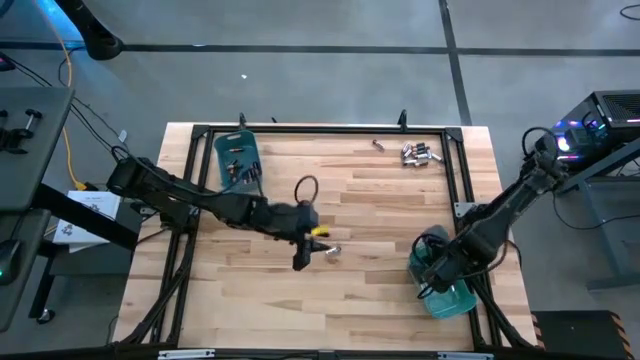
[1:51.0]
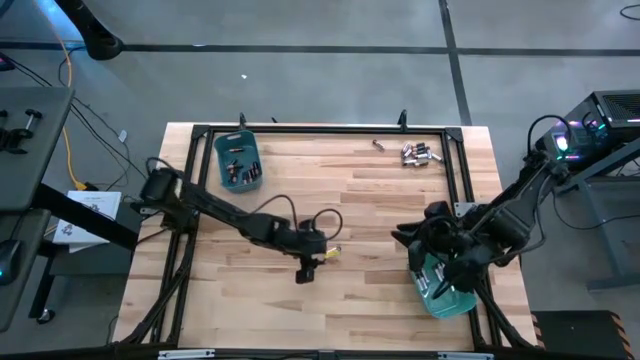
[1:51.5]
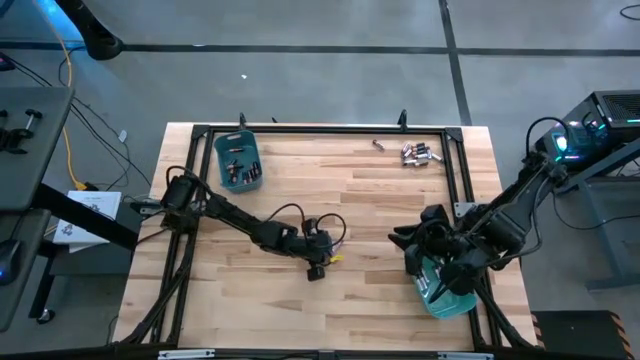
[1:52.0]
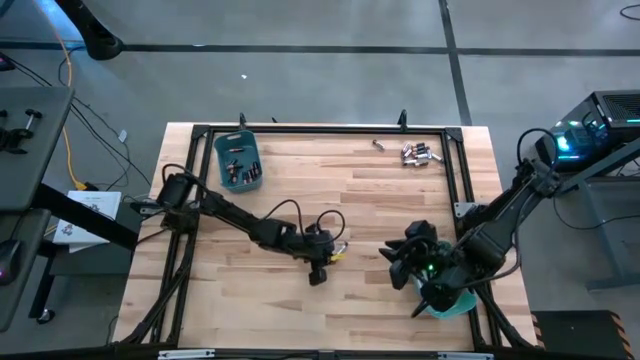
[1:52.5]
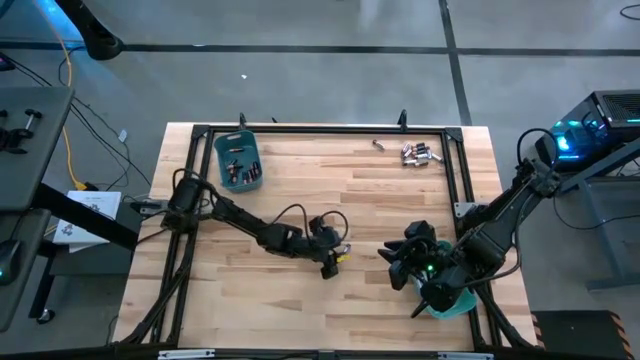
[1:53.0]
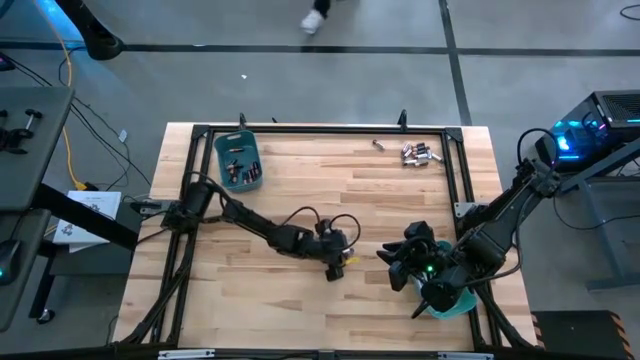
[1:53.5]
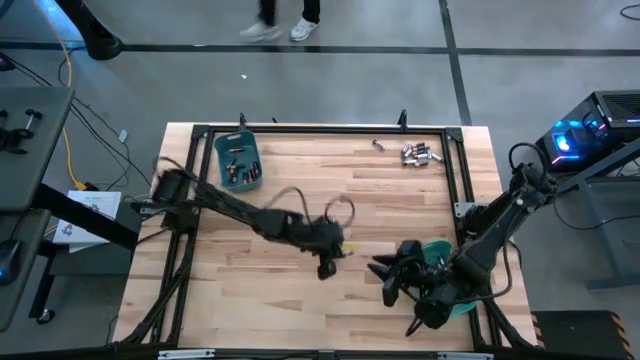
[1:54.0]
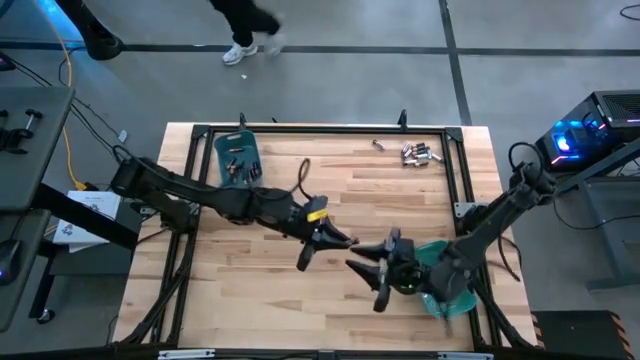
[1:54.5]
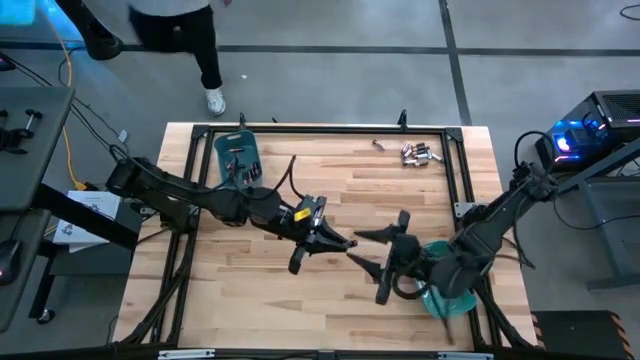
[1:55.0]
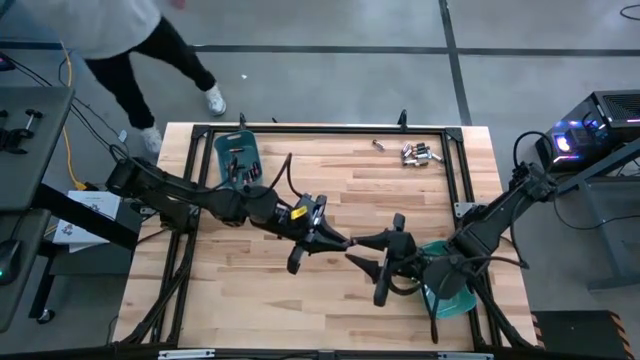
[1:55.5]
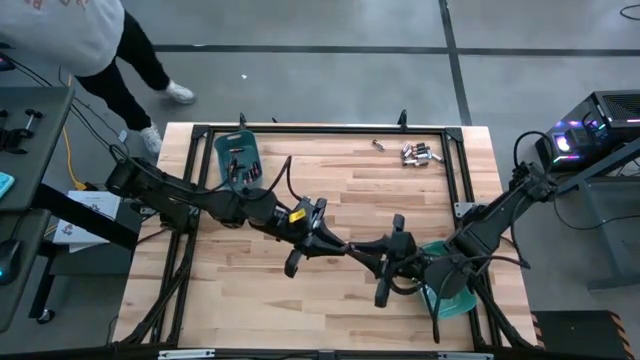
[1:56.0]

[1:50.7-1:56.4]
Task: Sort batteries
Put the silver battery into the green bin

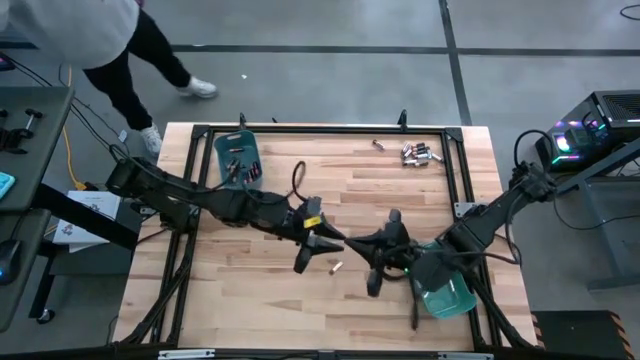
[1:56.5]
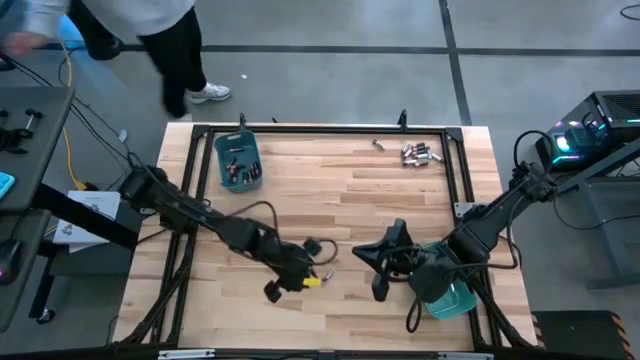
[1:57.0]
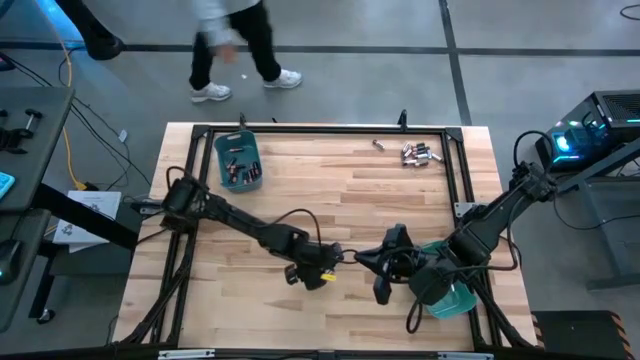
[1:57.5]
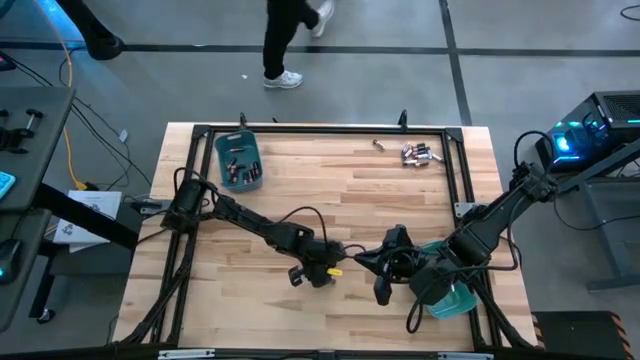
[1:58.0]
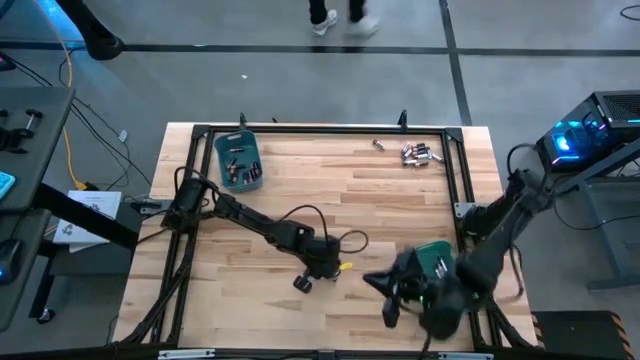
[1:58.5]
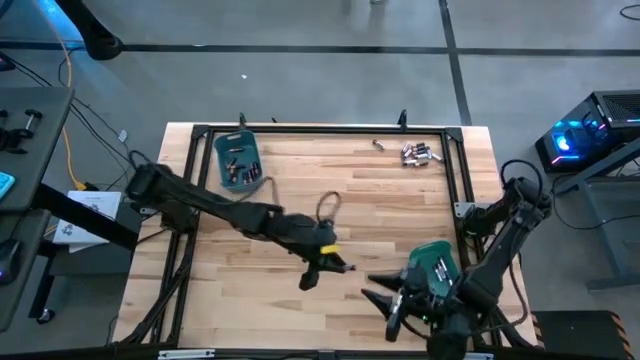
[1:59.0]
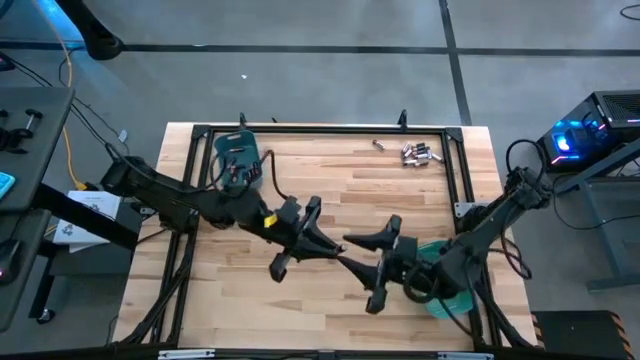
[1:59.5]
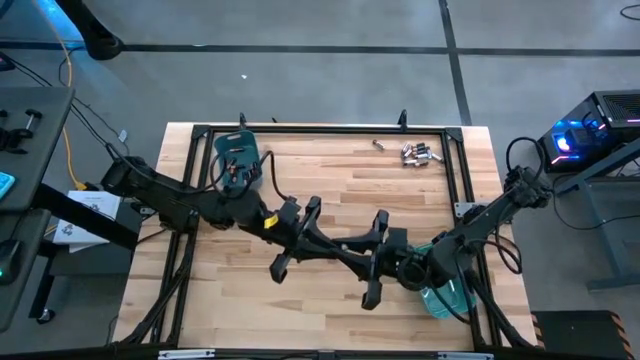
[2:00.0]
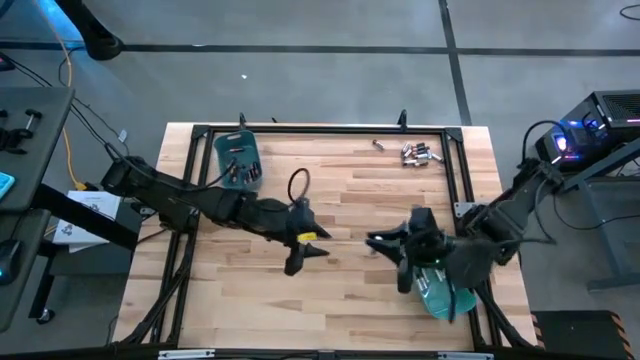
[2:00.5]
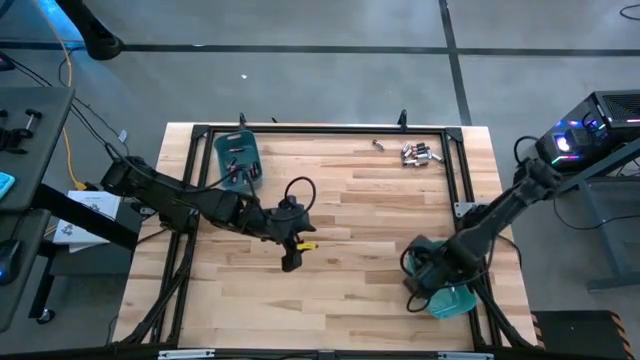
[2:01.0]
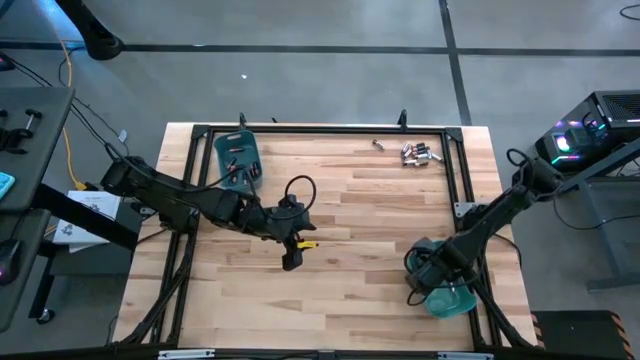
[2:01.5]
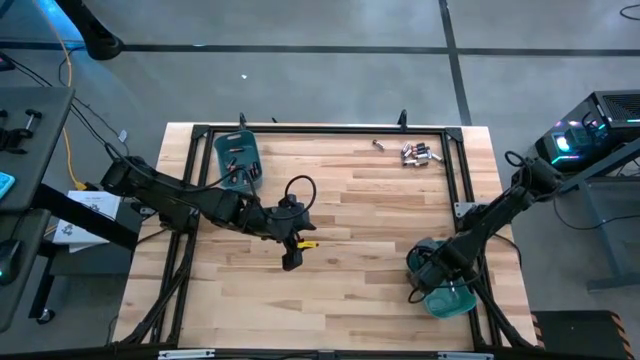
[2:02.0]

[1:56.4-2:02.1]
Put the silver battery into the green bin

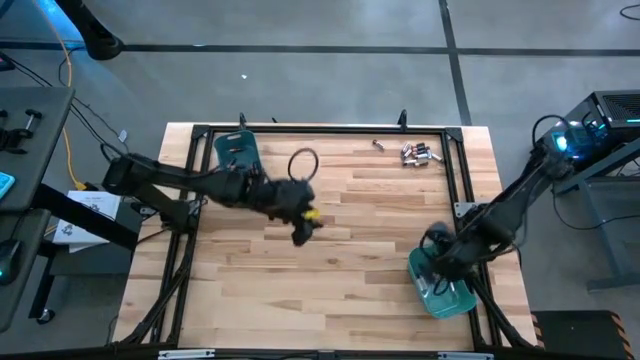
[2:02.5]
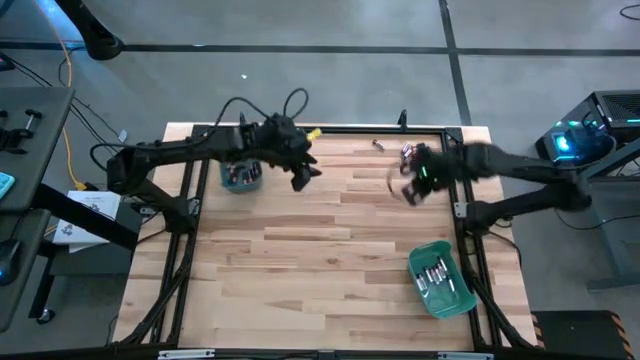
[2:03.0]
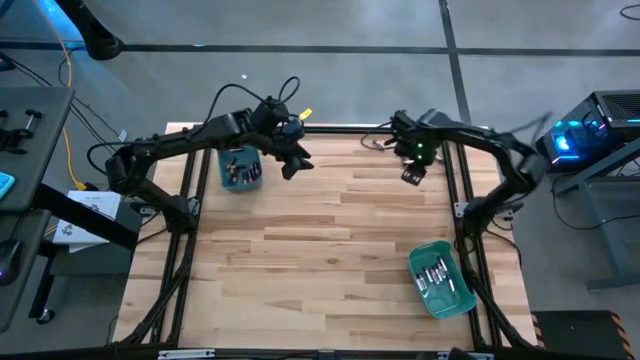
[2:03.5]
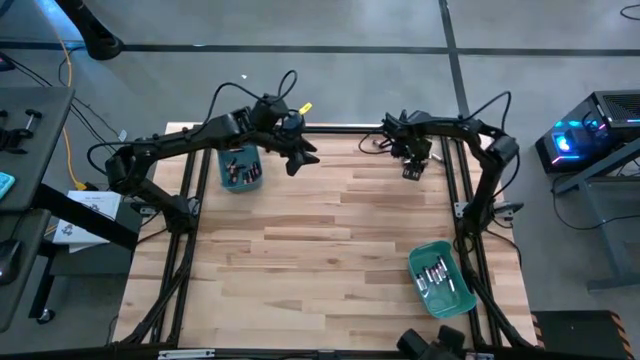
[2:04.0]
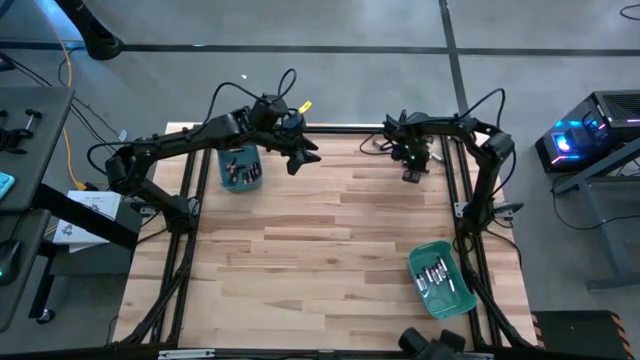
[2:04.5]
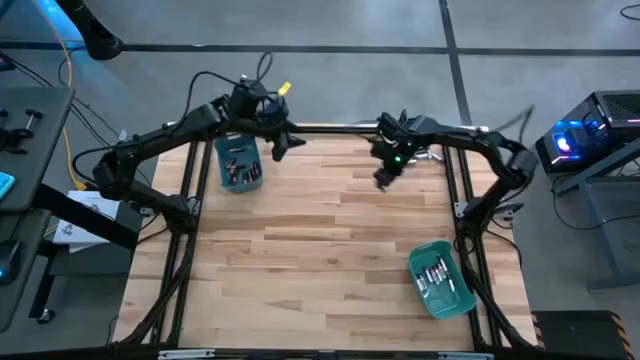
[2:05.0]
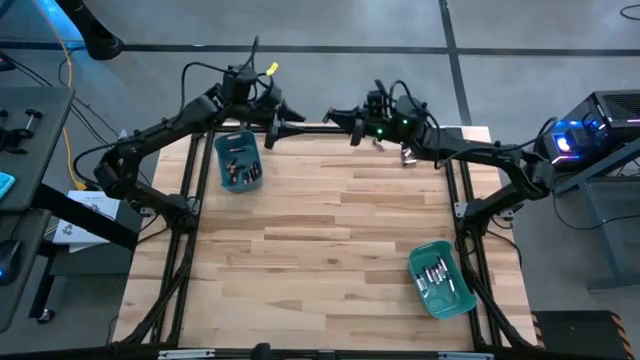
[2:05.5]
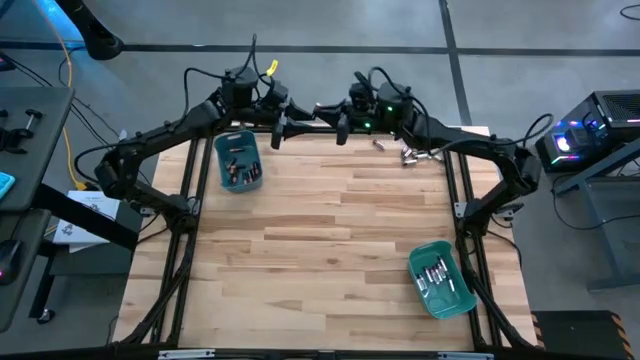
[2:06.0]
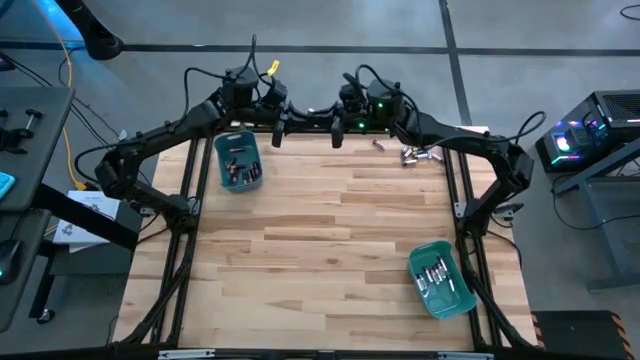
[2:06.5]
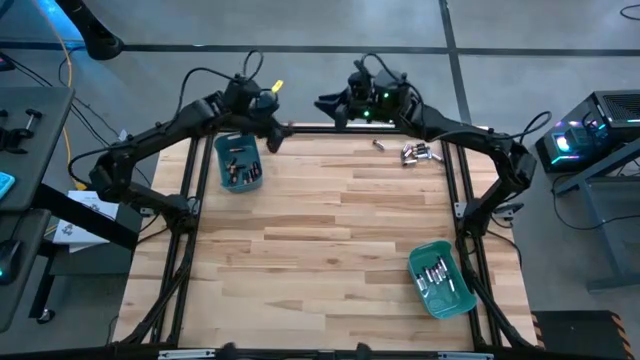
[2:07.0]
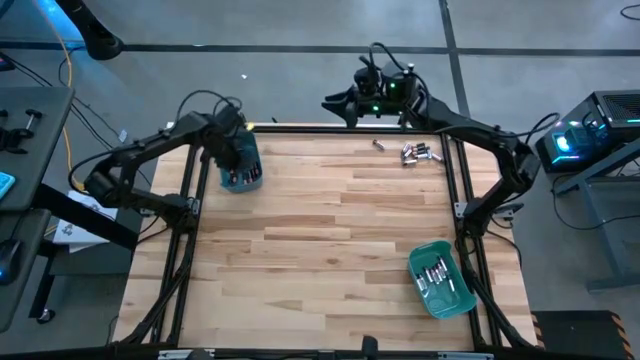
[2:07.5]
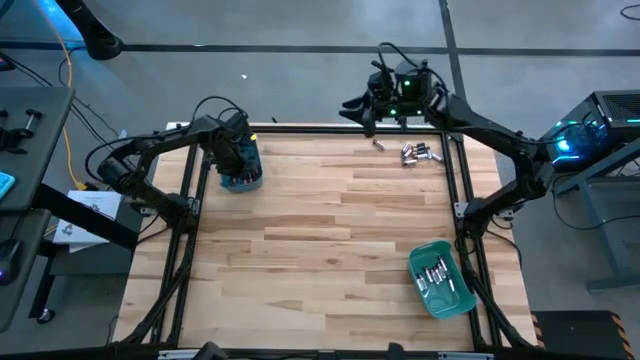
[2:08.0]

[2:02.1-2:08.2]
Put the black battery into the blue bin

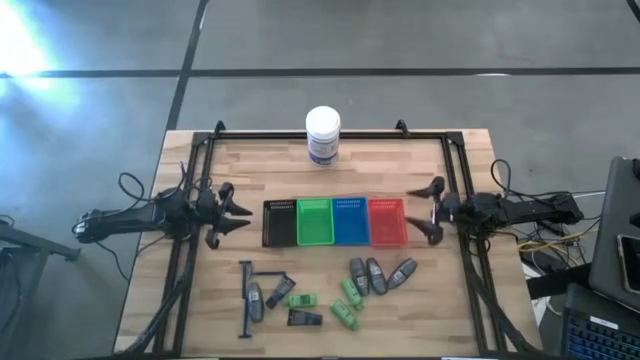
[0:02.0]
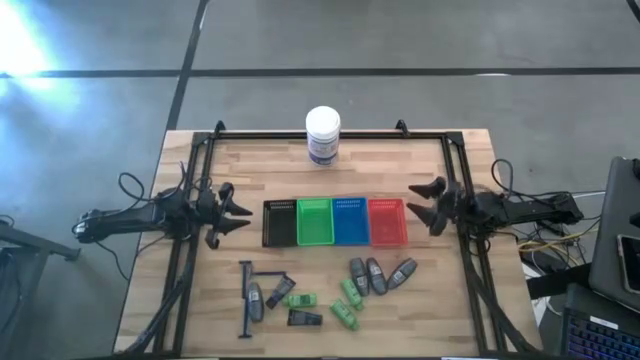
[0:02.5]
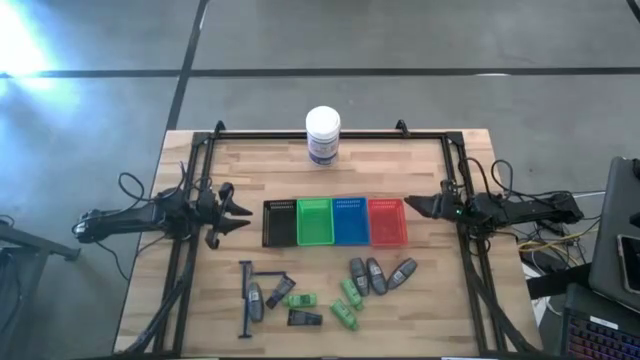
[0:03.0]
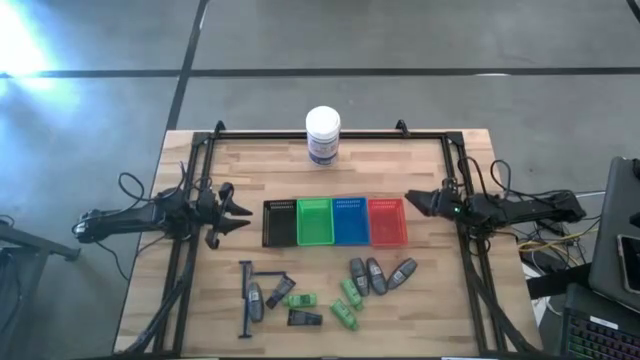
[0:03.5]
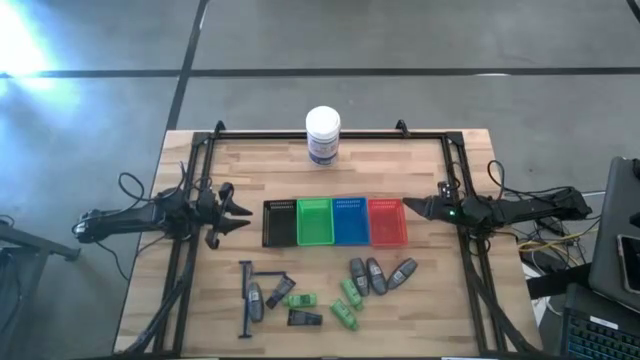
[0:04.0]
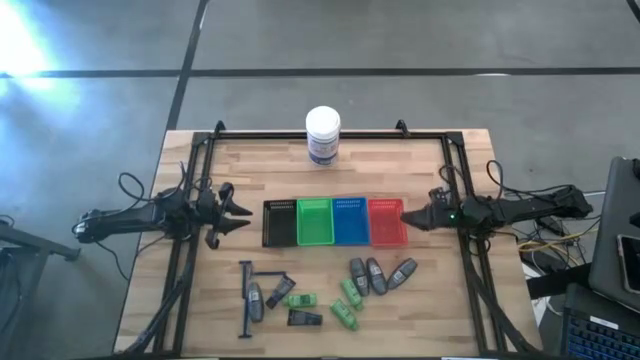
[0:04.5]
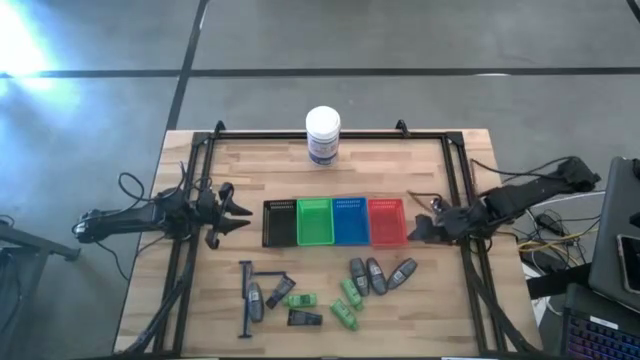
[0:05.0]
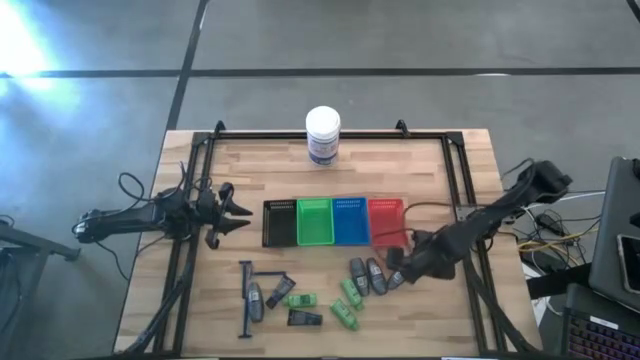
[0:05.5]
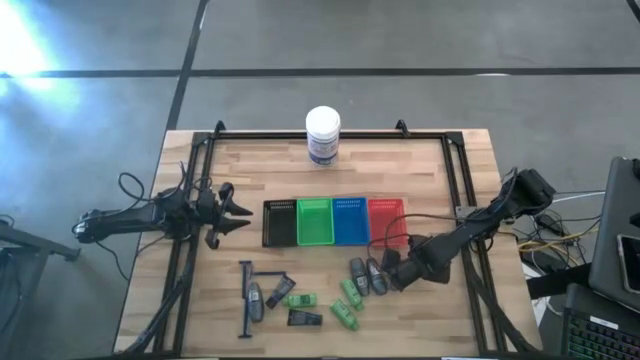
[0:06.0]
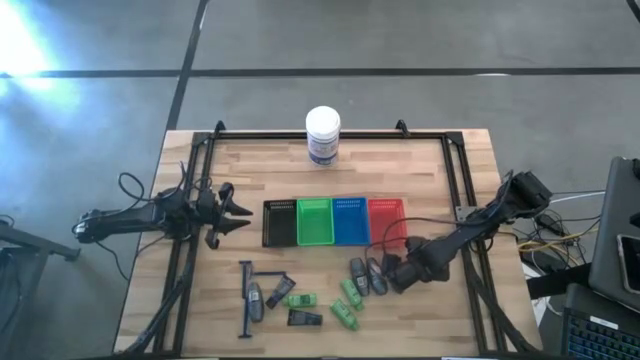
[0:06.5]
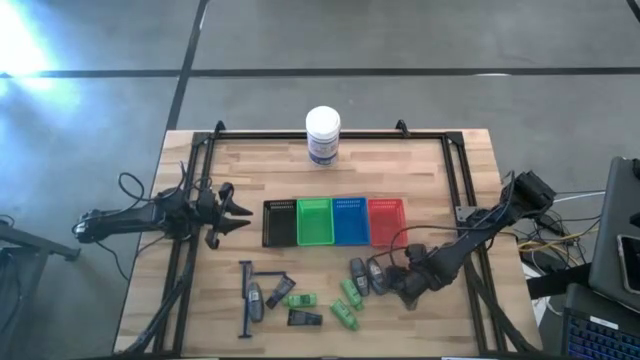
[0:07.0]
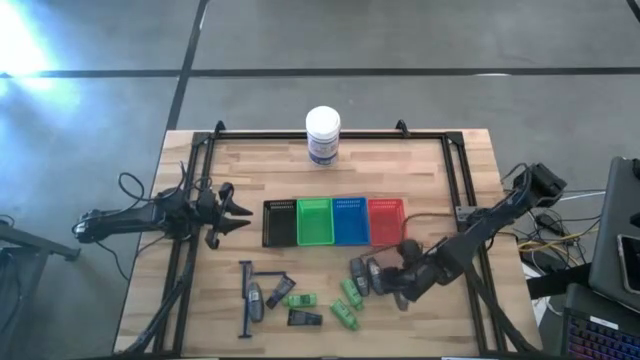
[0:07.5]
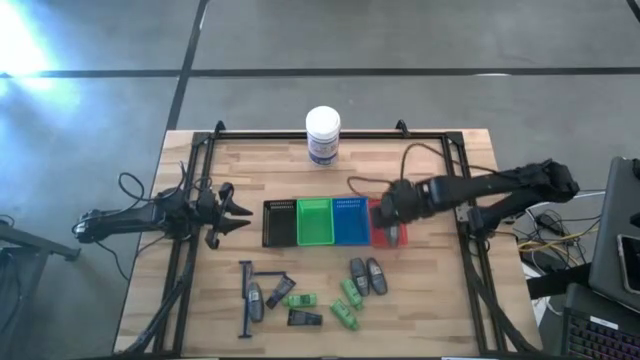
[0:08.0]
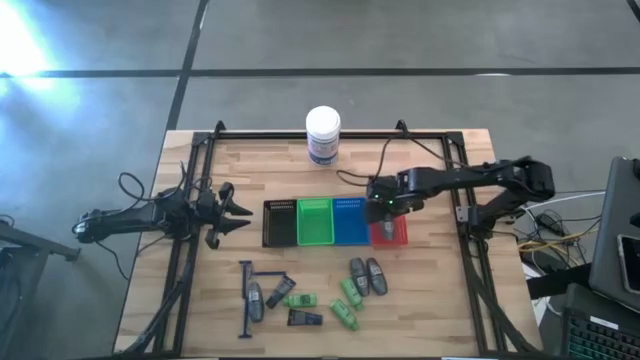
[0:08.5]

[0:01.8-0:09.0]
Task: Pick & Place Travel size toiletries
Put the black deodorant into the red bin
